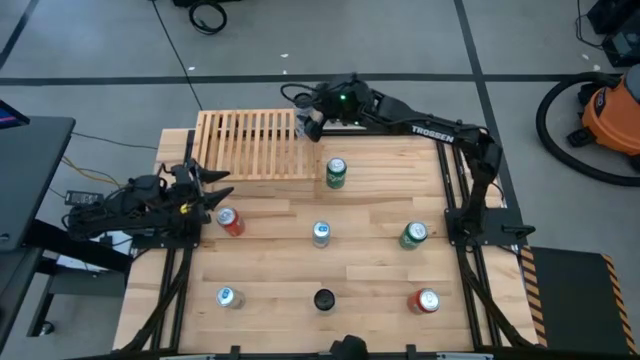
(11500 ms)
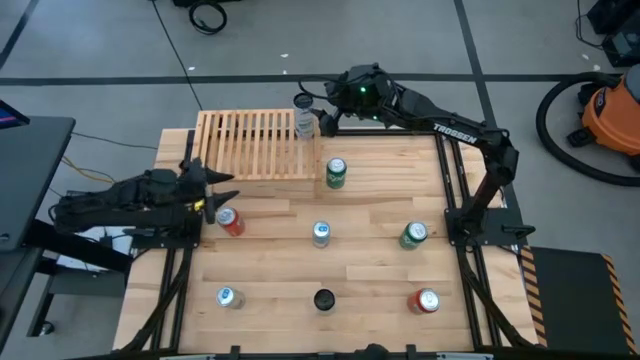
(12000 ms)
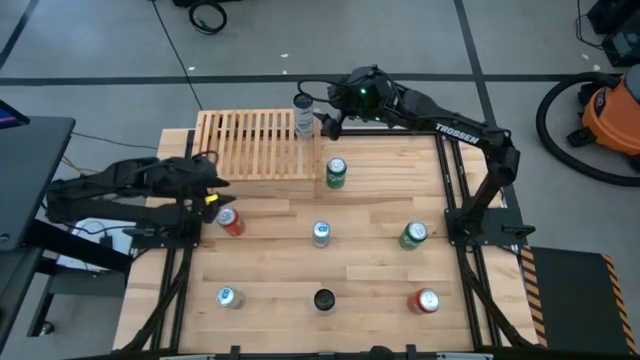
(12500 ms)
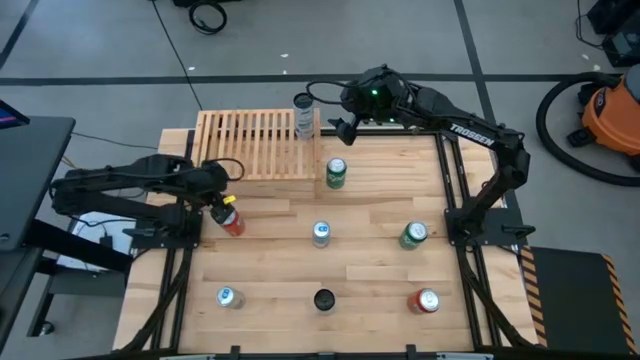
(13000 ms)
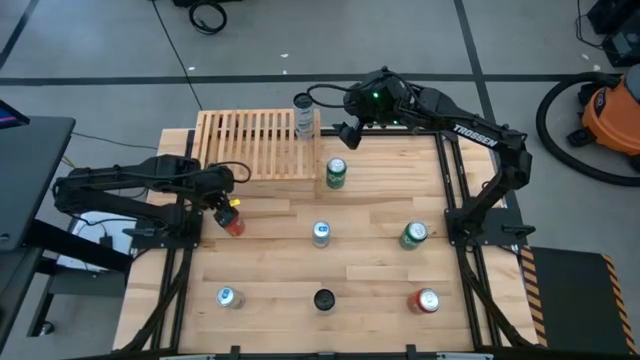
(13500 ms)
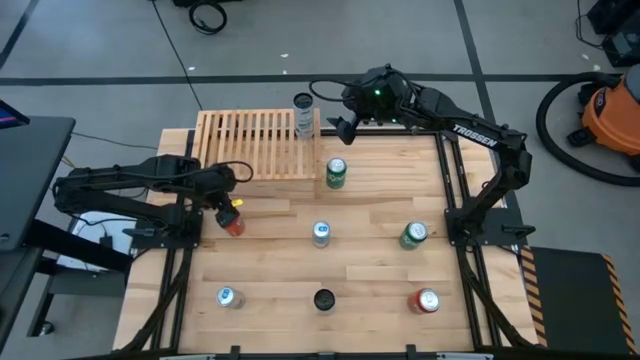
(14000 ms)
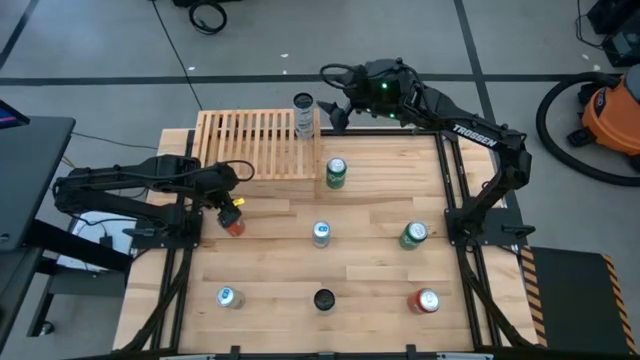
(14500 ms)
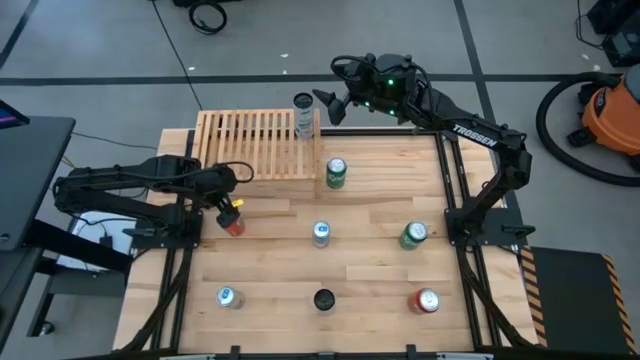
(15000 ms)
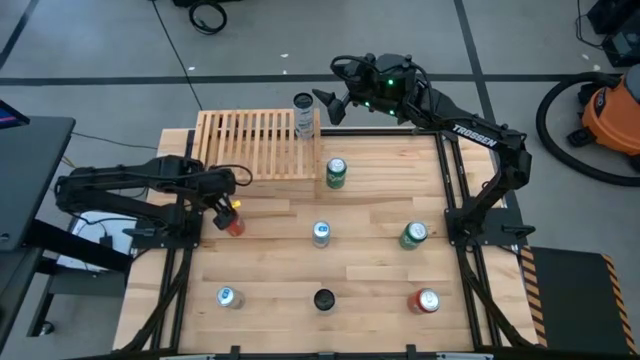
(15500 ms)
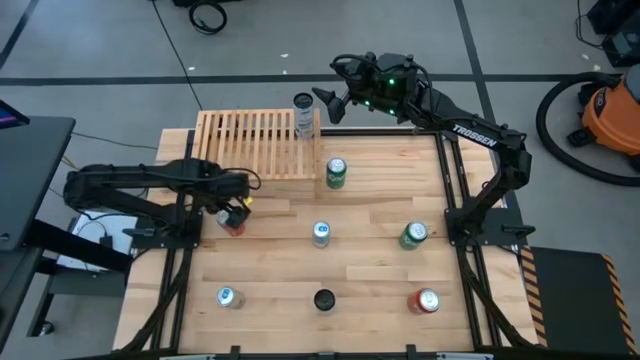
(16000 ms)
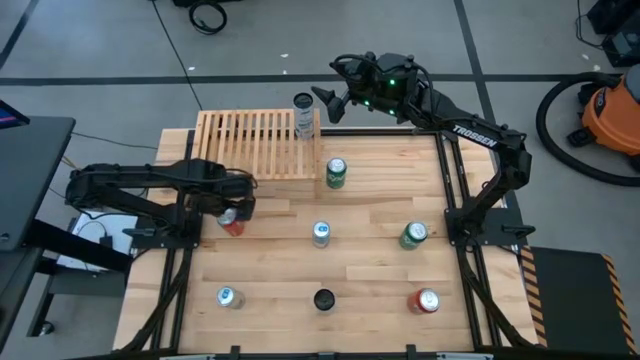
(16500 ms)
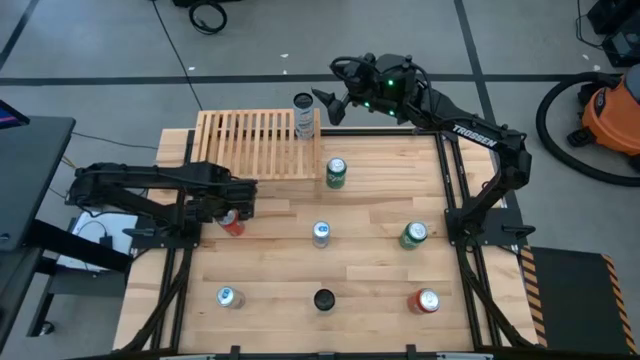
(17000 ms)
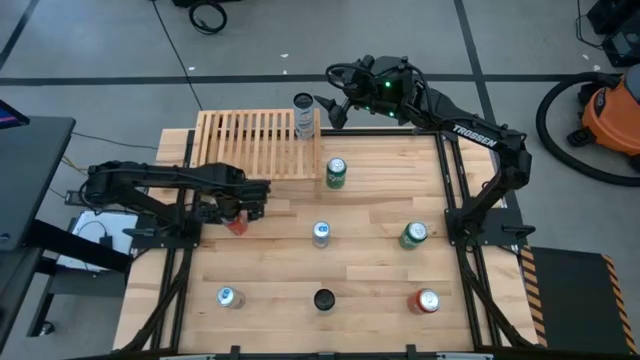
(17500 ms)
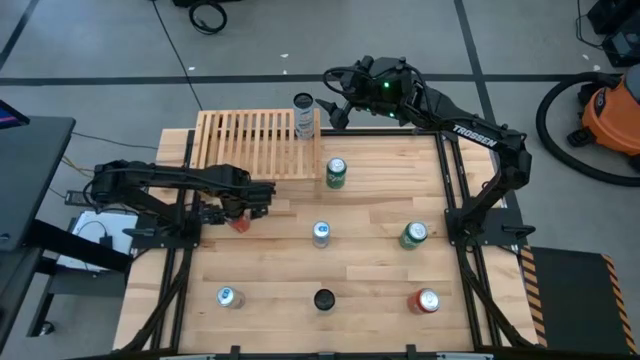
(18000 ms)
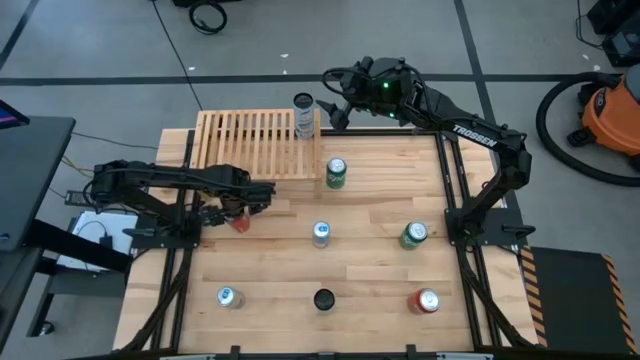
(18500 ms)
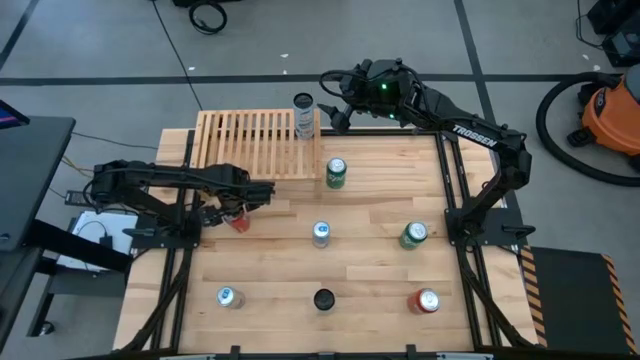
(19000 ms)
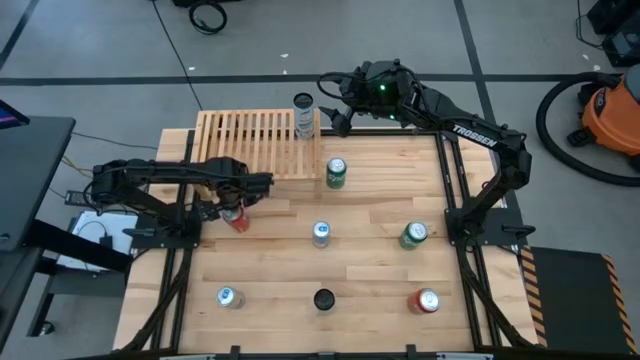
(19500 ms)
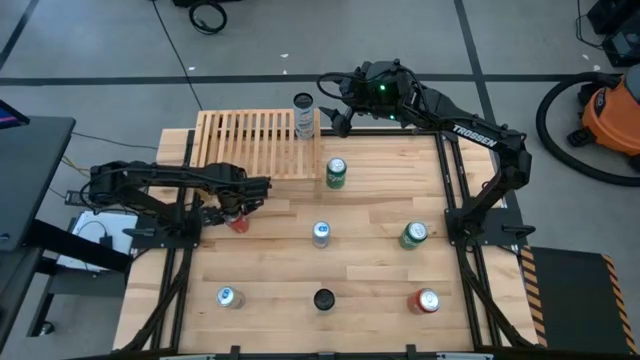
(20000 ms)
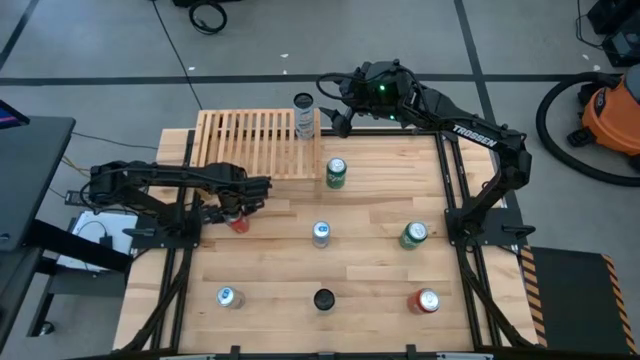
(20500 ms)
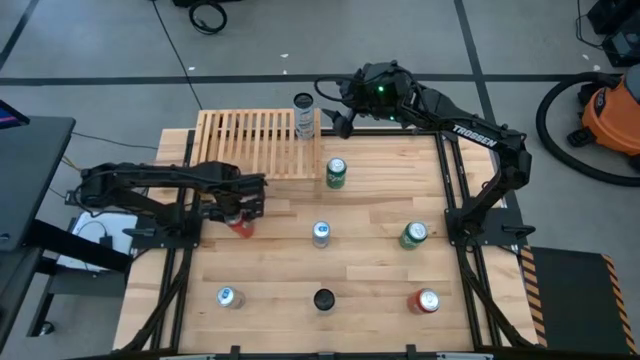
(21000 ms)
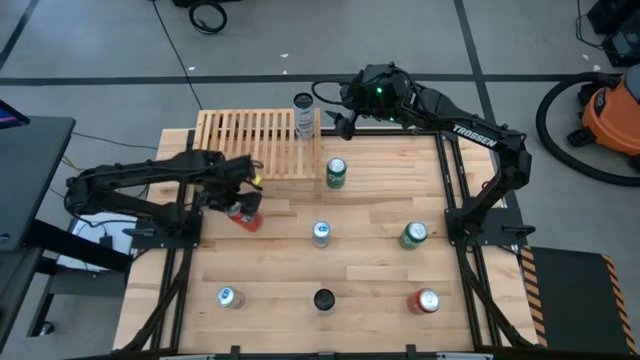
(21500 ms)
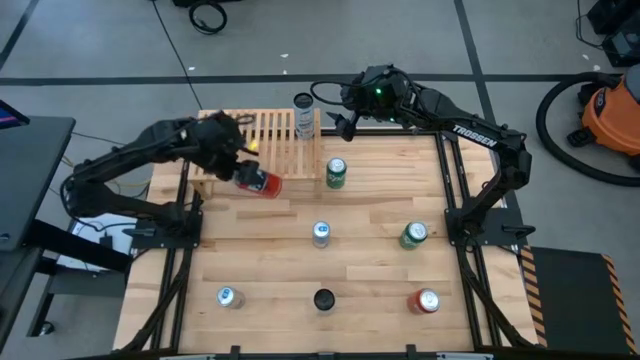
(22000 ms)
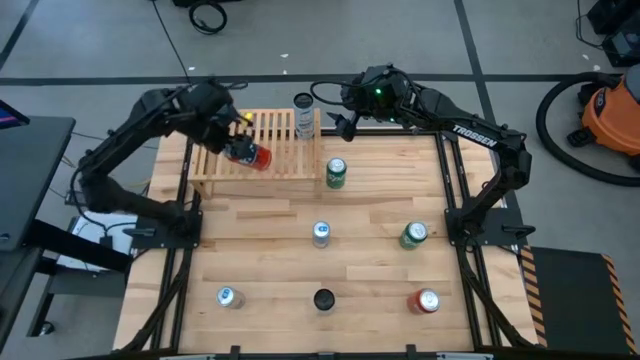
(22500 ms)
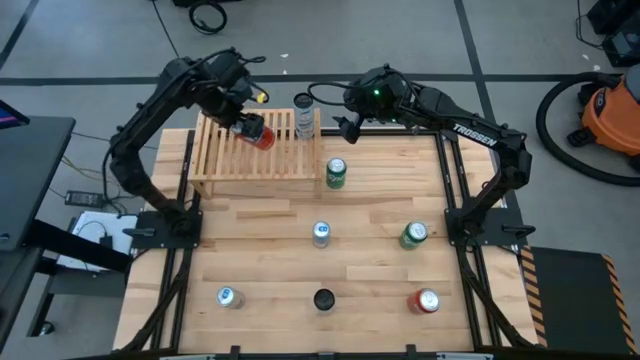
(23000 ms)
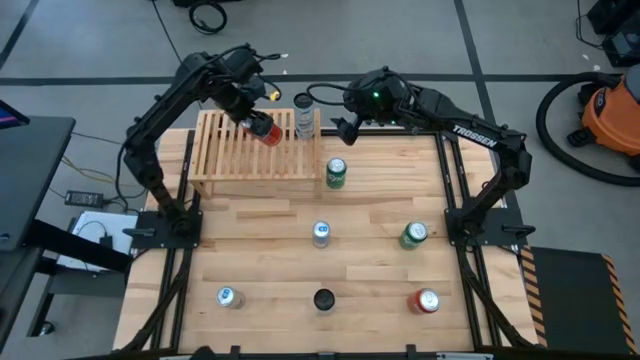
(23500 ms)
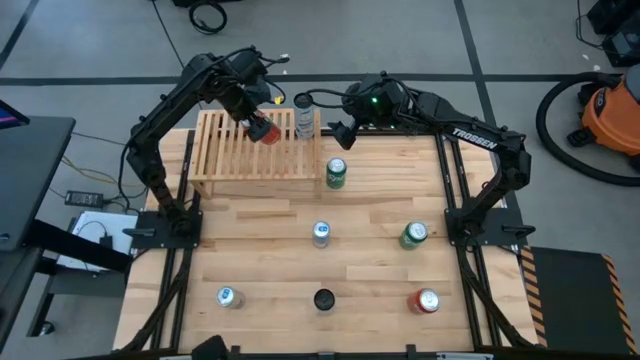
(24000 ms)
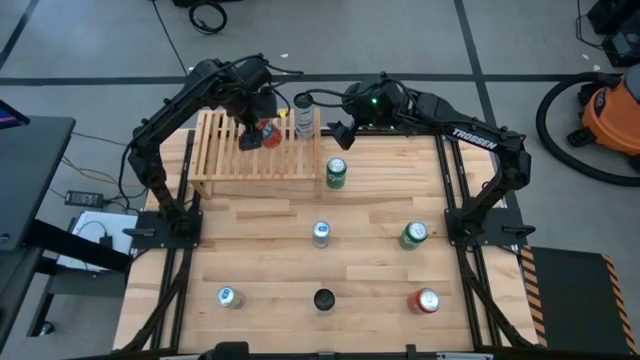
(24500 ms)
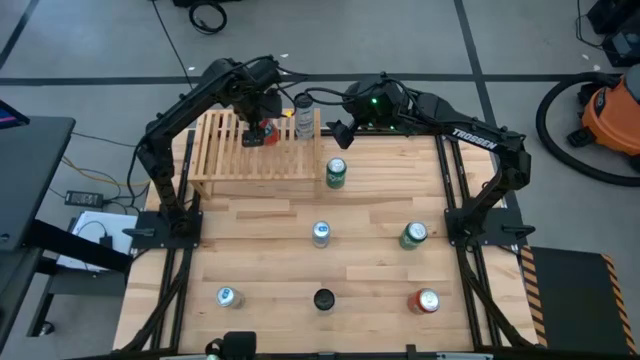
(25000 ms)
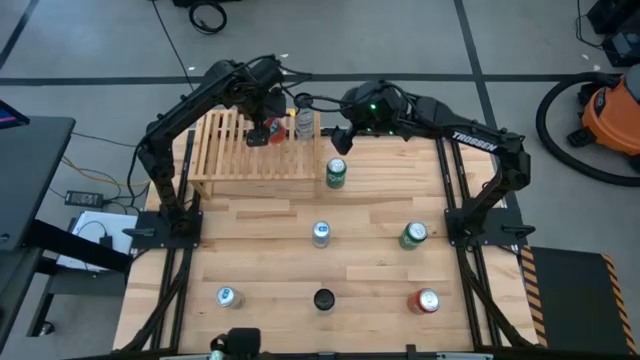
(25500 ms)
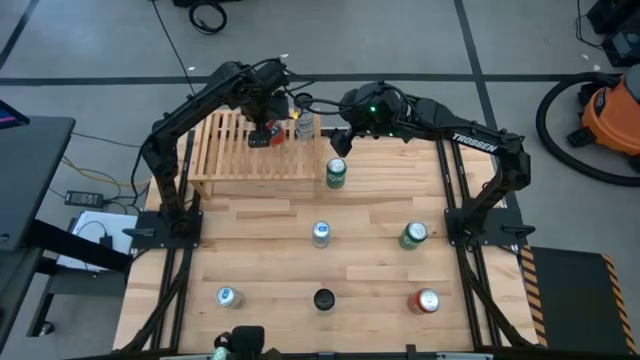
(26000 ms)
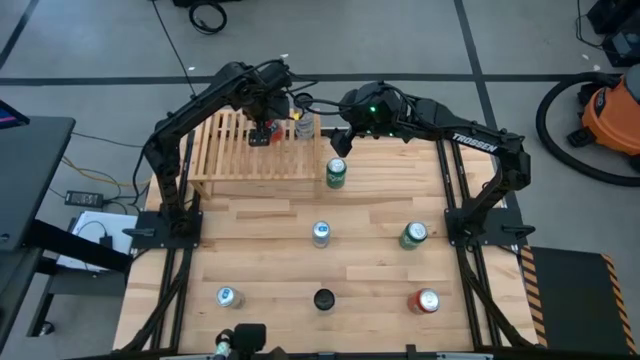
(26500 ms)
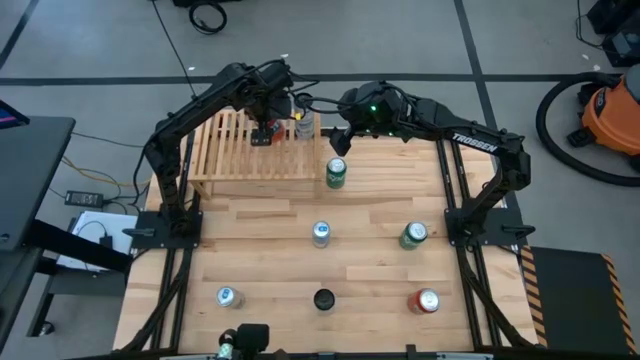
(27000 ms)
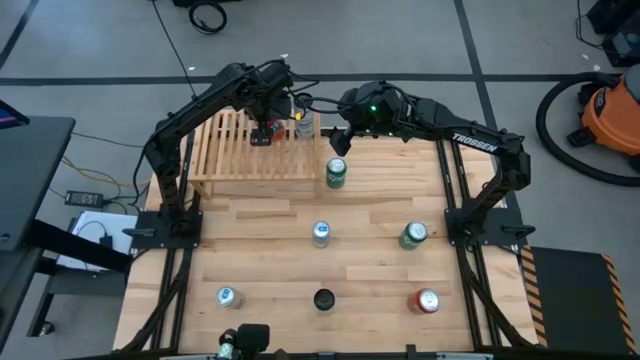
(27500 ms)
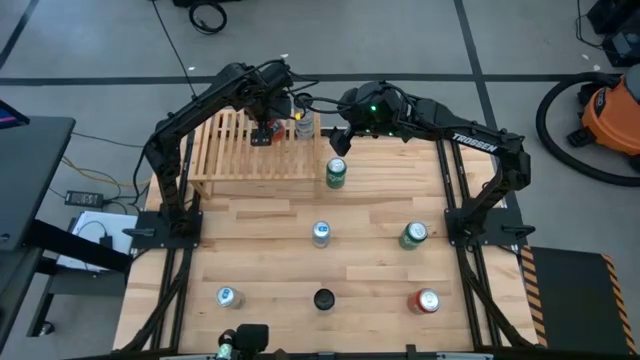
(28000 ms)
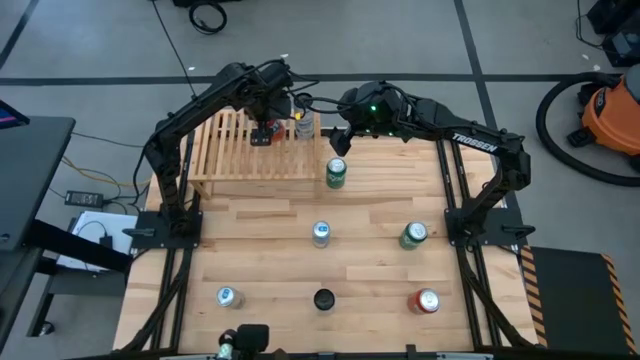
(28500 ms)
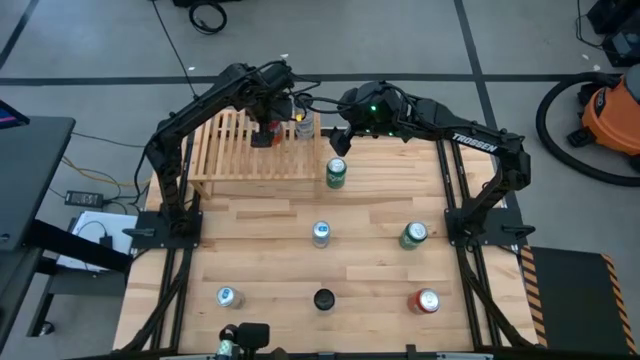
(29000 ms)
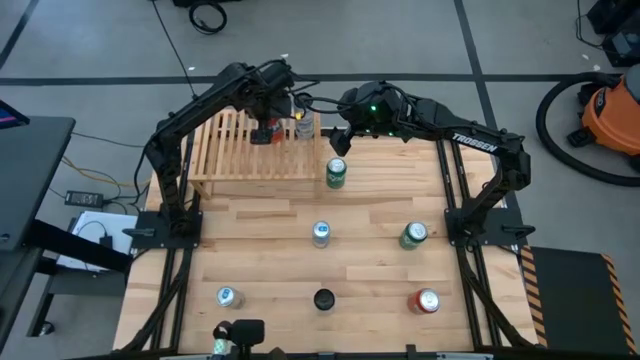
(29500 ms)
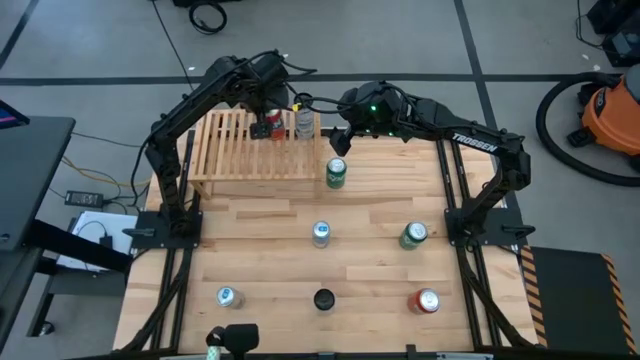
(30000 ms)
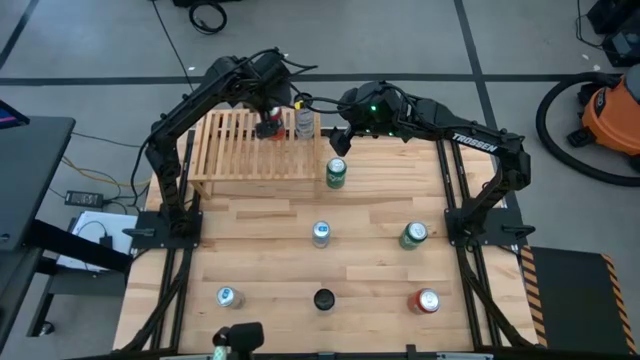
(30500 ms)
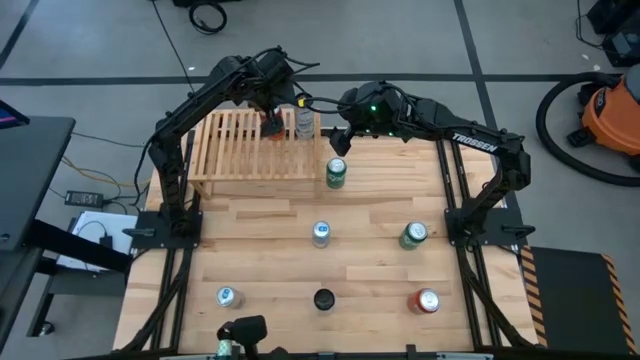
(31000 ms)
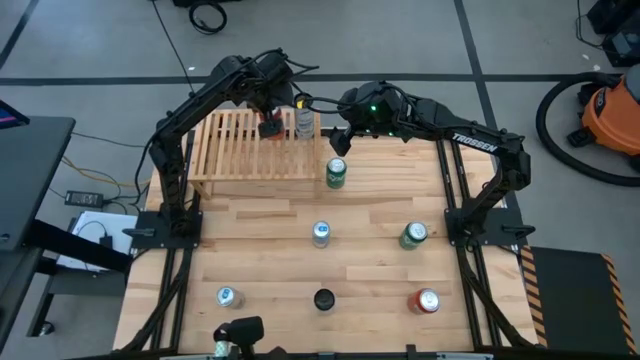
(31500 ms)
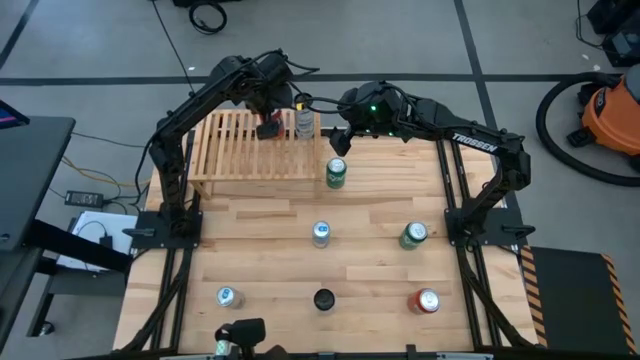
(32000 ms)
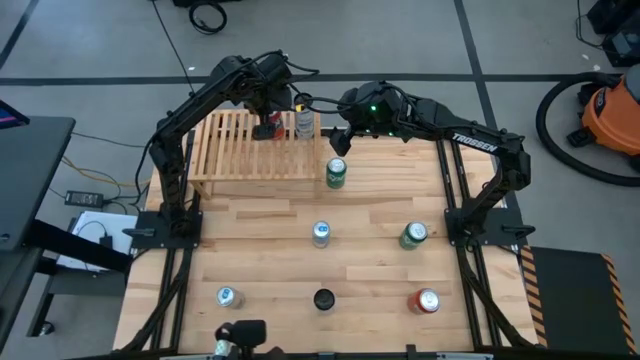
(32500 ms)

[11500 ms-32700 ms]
Task: Place canned beverage on shelf
Put the top orange soda can on the shelf
